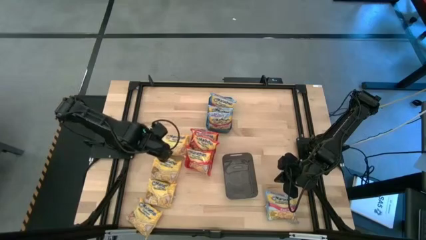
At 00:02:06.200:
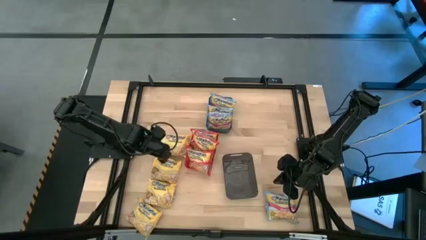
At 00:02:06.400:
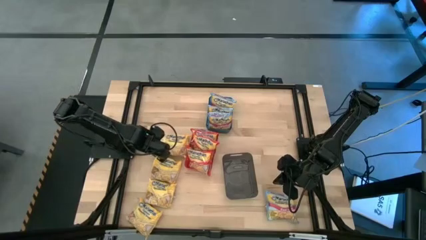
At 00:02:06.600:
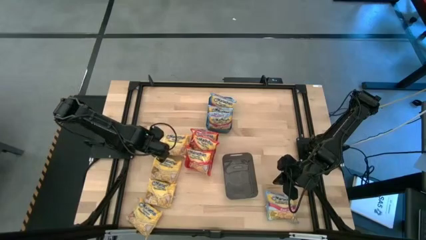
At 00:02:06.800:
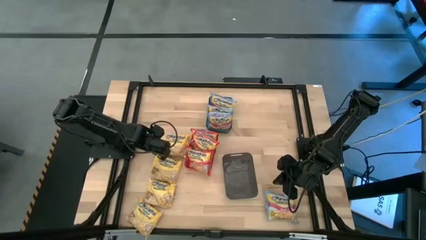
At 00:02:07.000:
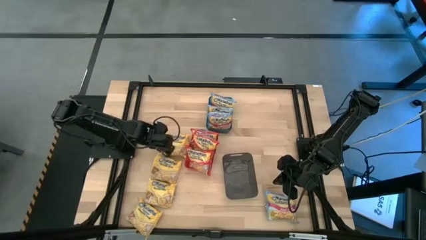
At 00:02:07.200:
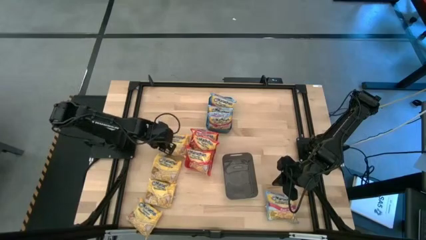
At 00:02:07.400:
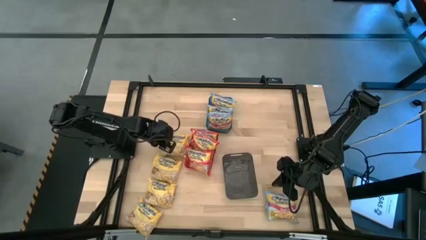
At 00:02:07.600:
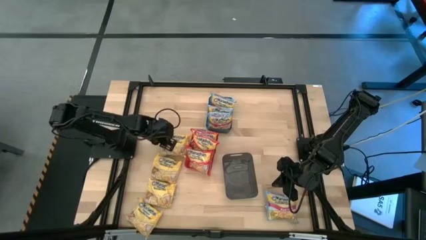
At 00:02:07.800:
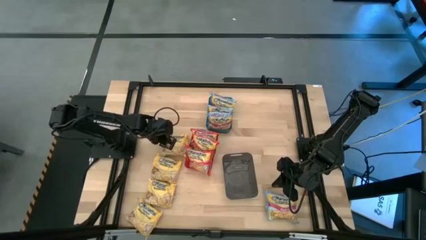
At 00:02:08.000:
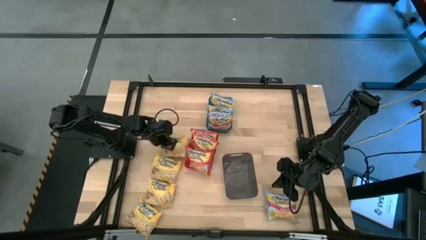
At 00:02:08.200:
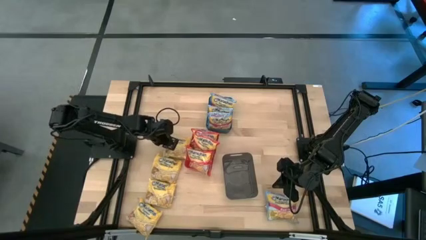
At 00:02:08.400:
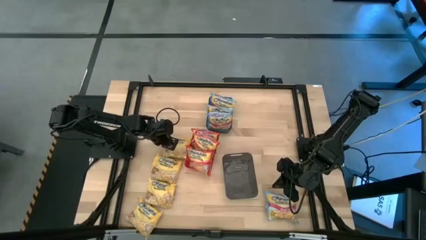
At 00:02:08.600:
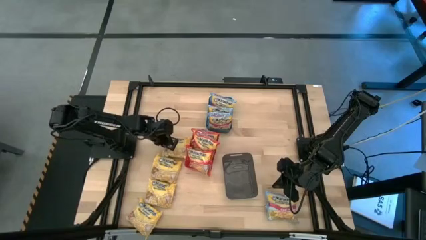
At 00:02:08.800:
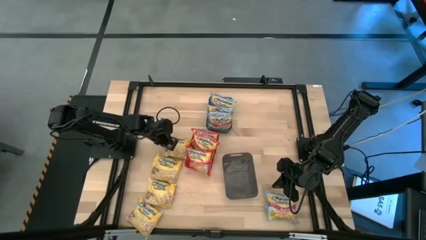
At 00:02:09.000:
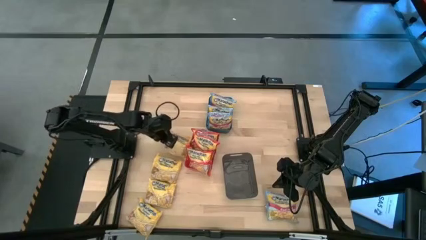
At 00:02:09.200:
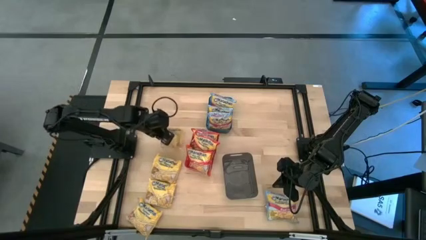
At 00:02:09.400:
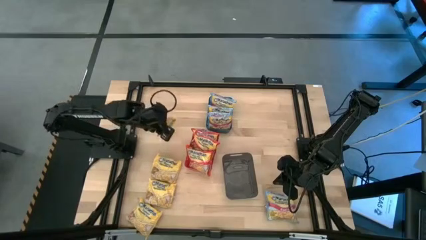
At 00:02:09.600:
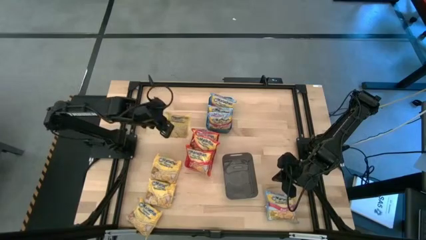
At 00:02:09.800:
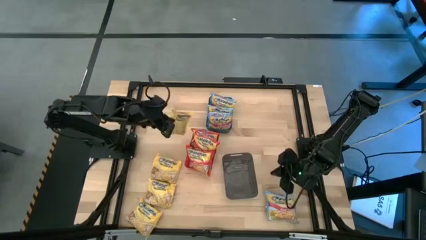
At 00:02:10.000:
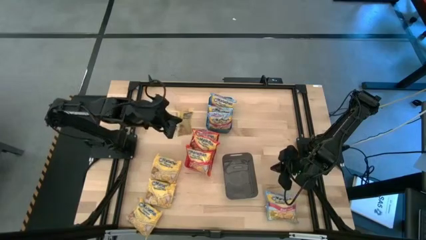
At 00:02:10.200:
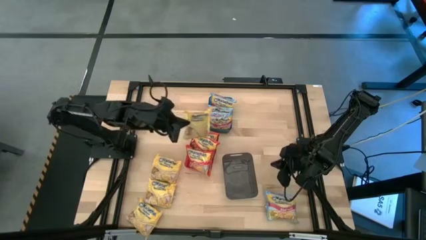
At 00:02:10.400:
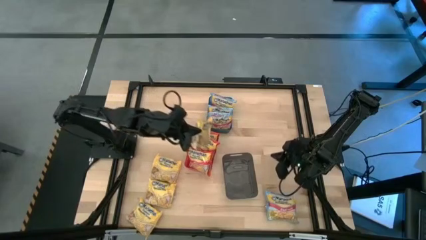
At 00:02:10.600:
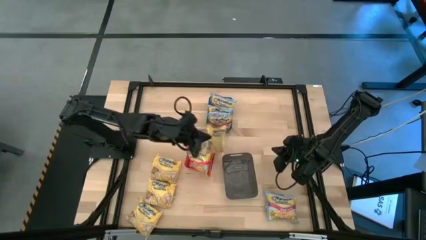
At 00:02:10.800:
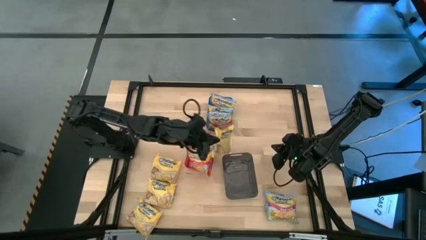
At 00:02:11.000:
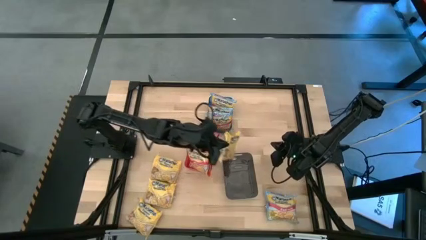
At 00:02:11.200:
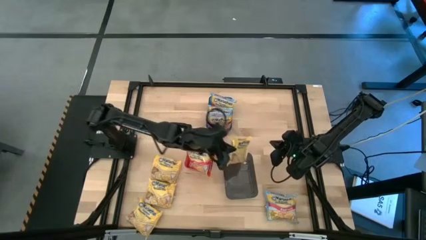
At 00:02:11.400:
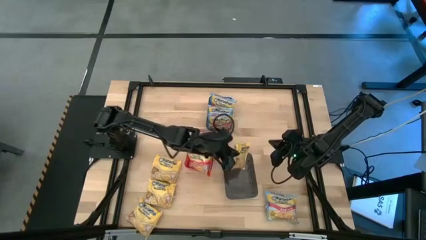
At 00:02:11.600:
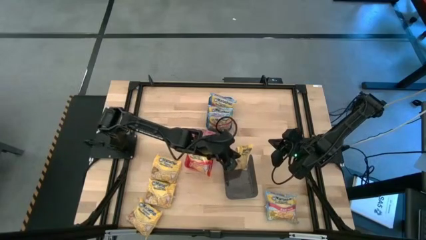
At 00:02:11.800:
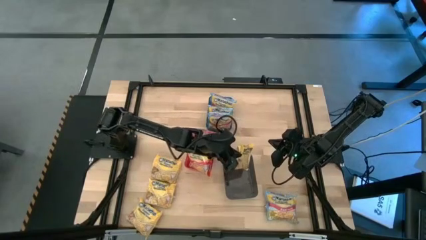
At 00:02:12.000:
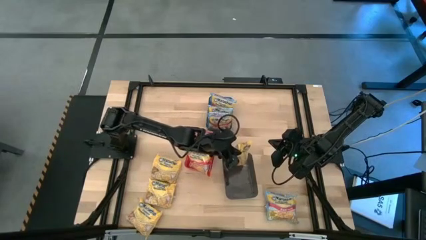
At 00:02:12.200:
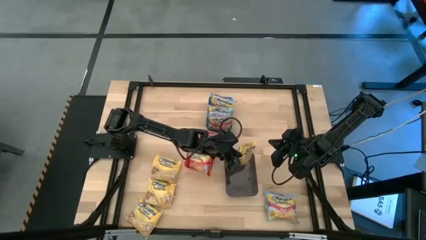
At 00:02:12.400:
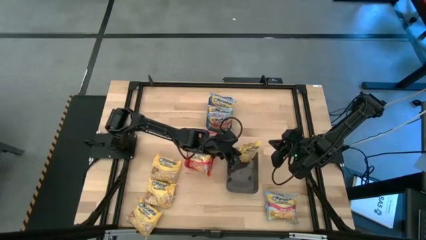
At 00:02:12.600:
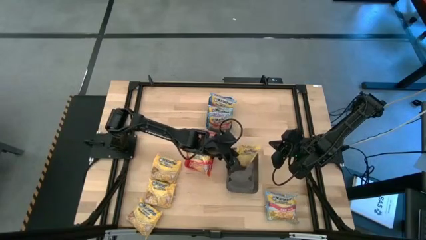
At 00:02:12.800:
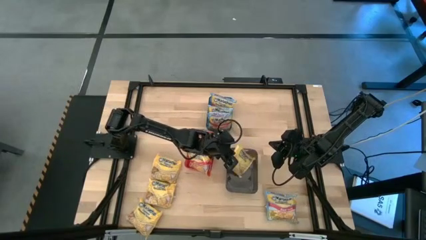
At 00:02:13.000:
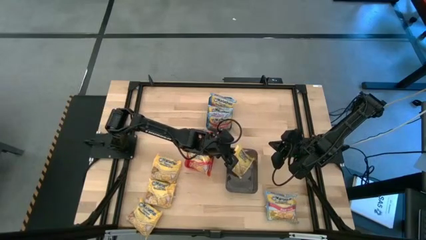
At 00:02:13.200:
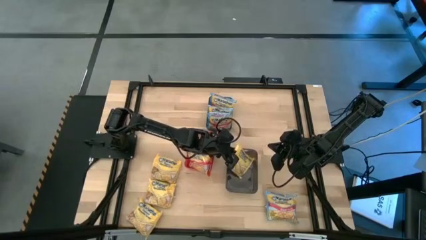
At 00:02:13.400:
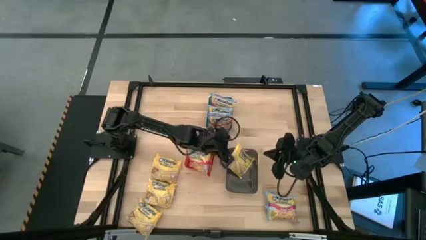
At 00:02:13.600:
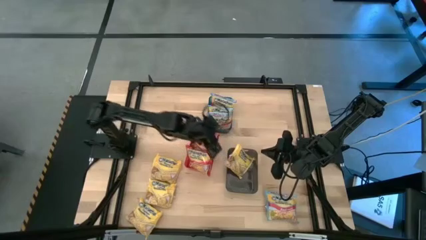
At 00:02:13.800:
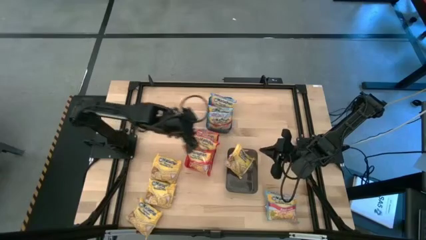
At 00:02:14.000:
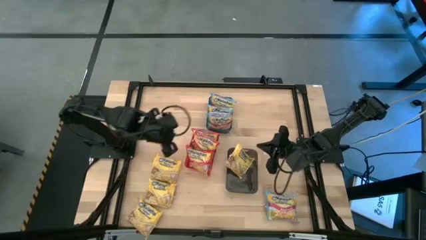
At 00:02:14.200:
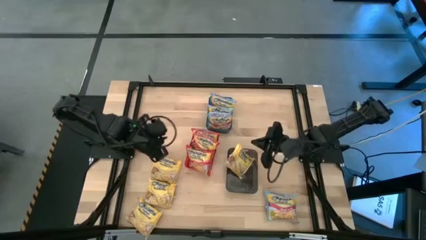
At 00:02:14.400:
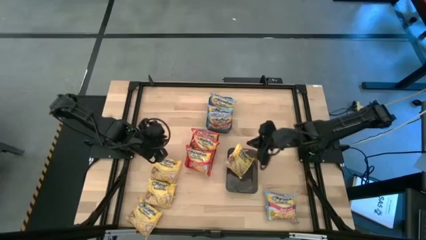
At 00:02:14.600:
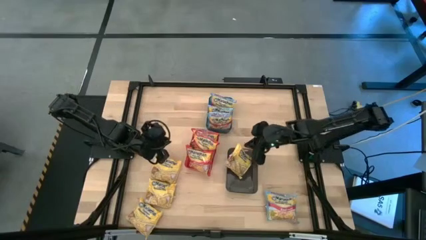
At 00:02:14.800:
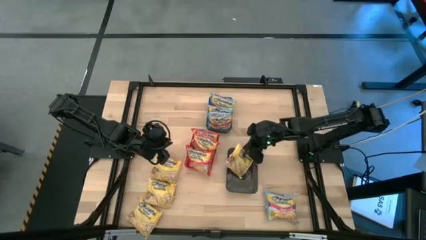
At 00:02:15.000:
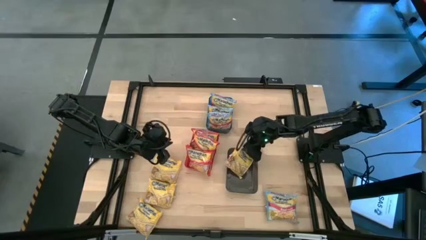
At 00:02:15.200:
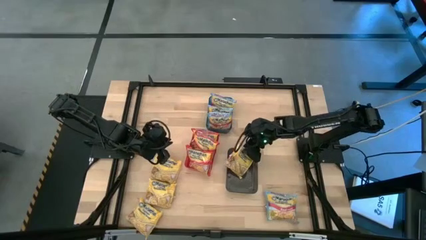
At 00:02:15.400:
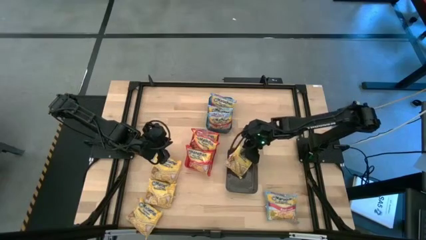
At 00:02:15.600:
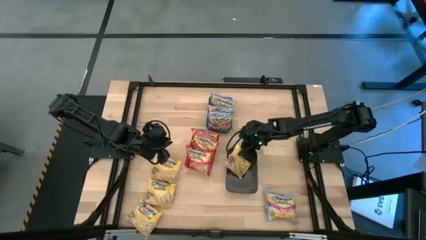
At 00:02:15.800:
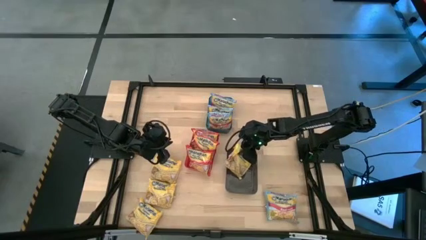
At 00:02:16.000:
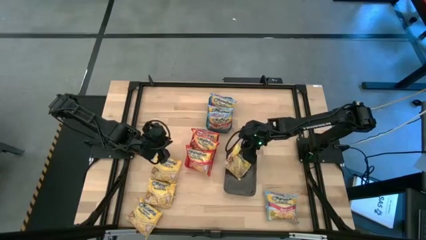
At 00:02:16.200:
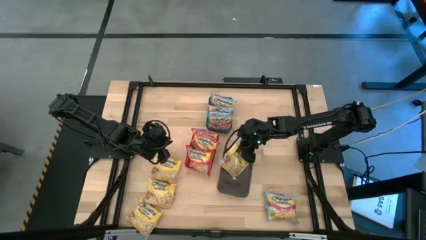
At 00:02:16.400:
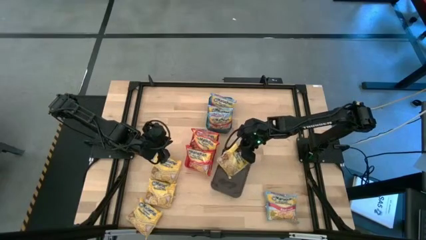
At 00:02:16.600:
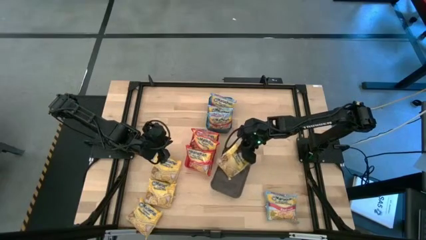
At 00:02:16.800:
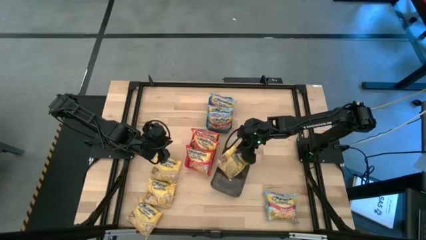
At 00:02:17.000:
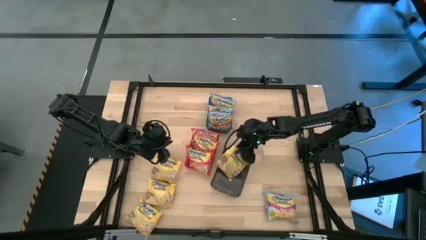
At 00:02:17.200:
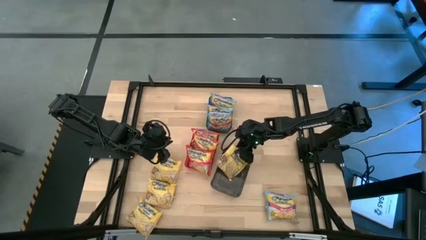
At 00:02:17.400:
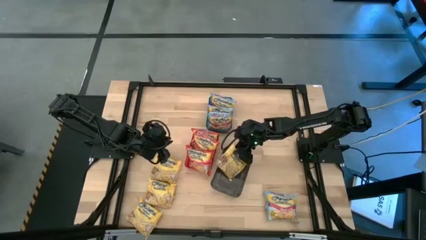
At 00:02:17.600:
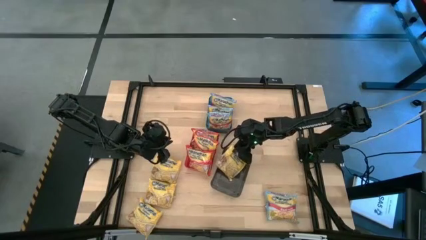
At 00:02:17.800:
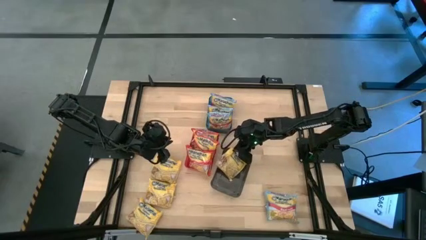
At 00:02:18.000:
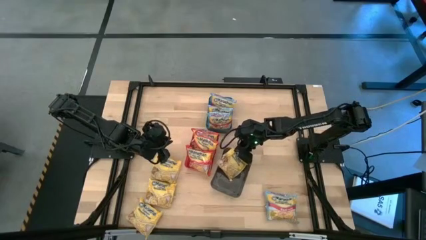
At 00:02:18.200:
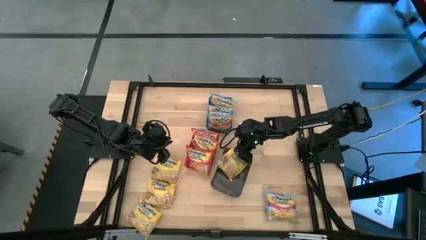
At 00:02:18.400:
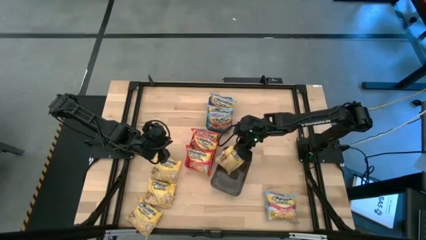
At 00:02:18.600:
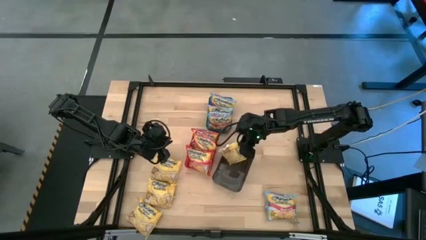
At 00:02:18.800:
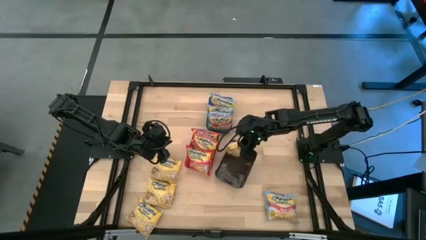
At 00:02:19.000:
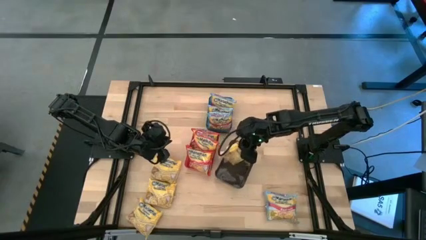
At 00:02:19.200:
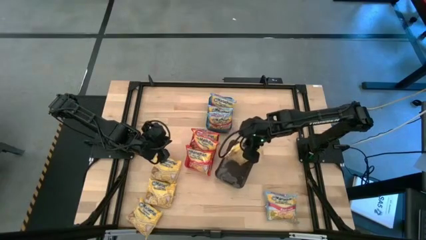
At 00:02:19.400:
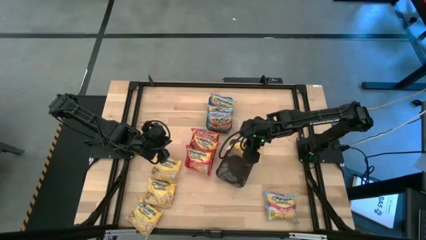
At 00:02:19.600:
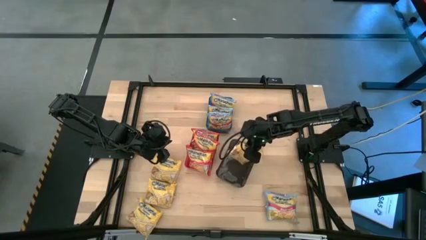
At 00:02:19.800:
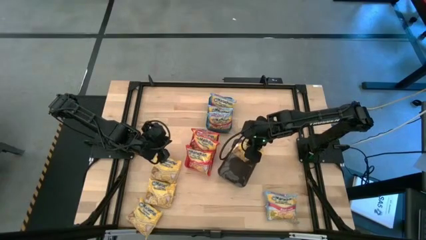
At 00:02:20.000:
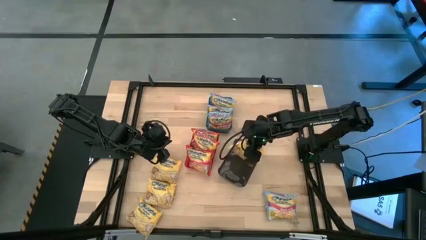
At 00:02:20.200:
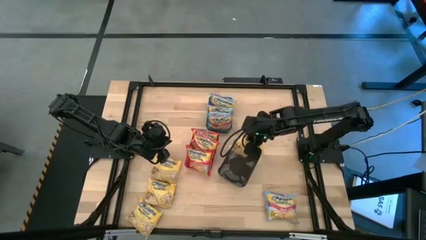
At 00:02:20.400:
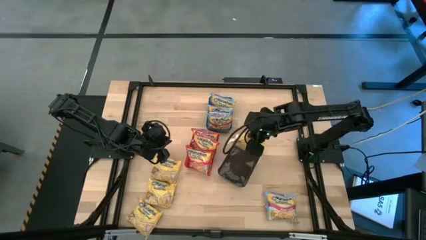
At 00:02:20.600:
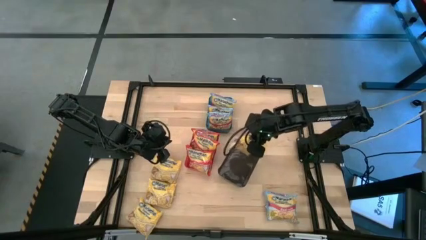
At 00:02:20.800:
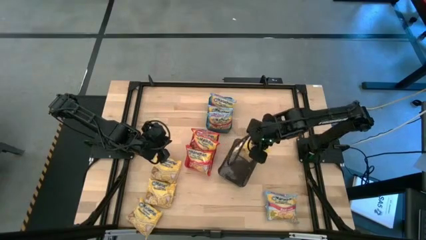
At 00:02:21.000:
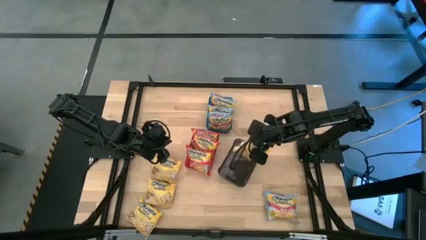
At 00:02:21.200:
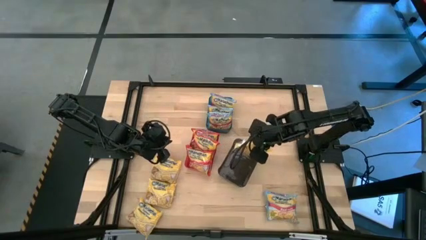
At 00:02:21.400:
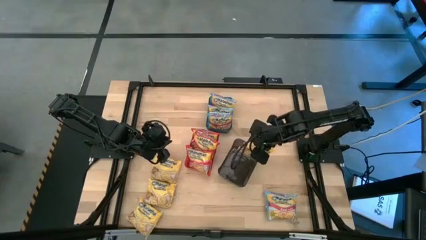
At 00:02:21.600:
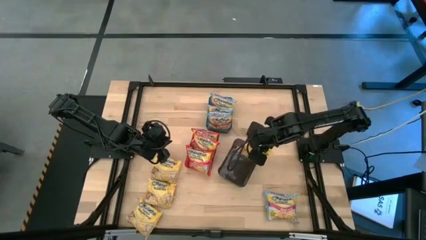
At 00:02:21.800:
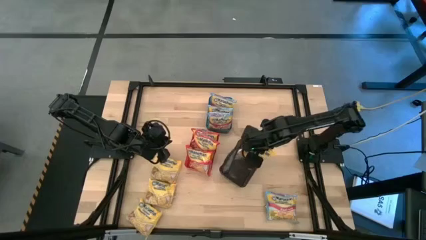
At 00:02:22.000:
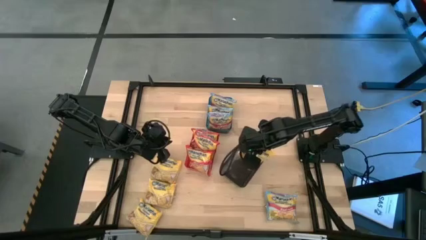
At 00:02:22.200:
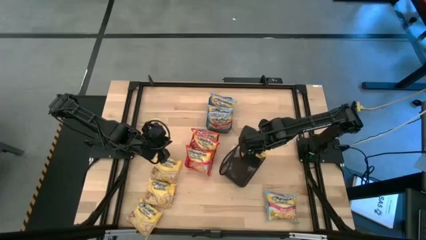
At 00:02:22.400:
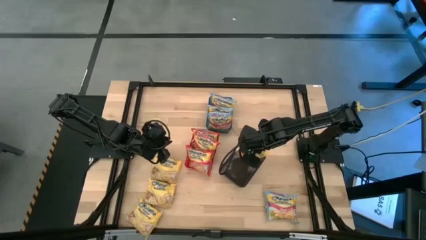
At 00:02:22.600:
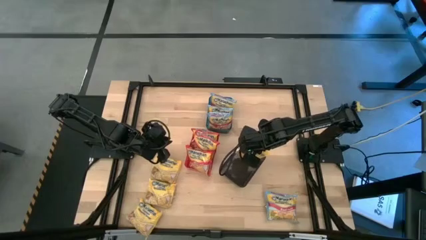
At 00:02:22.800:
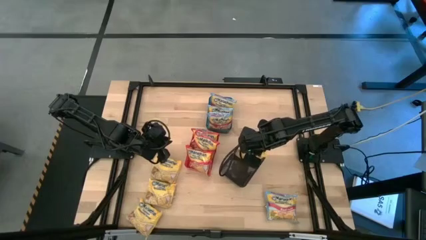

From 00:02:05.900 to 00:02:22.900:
Task: Sort Maruchan noodles
Put the yellow bag into the black bin
